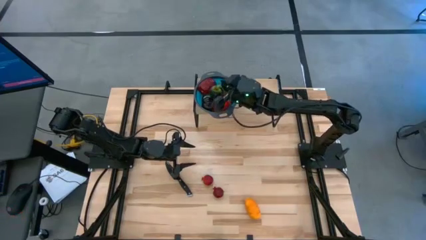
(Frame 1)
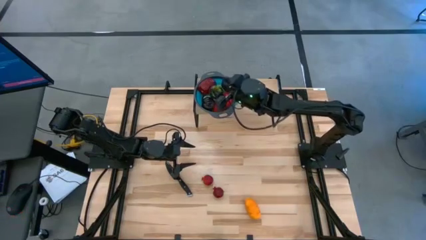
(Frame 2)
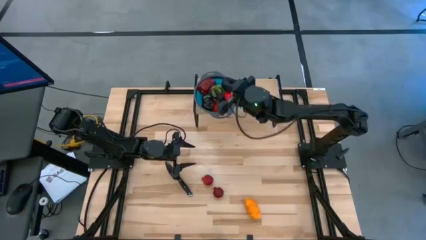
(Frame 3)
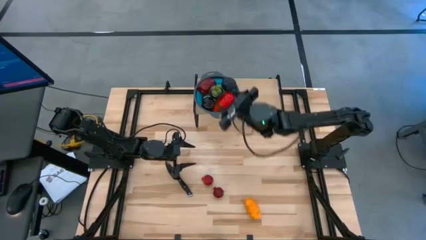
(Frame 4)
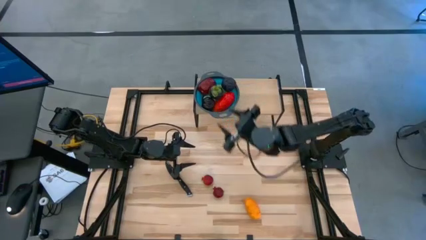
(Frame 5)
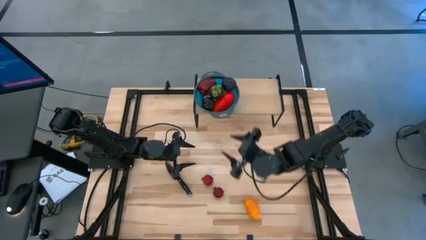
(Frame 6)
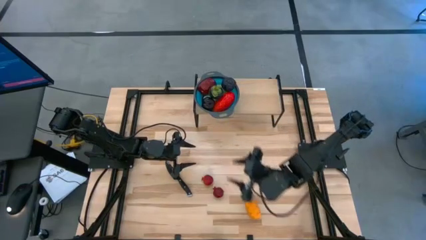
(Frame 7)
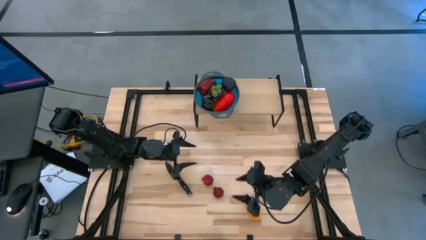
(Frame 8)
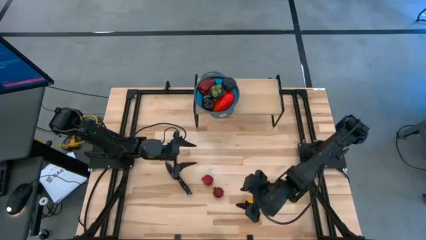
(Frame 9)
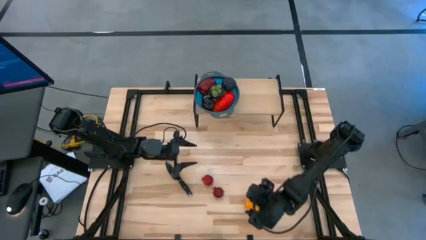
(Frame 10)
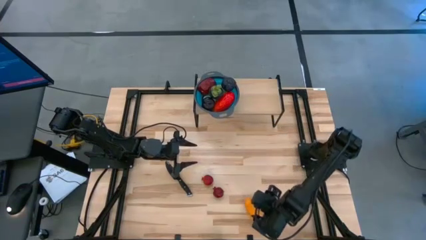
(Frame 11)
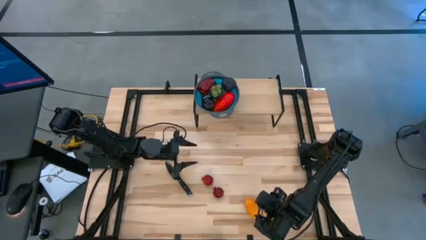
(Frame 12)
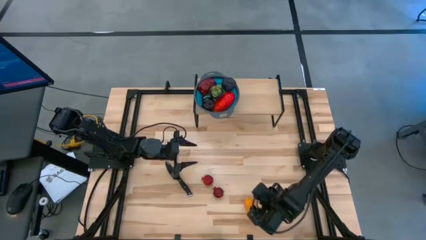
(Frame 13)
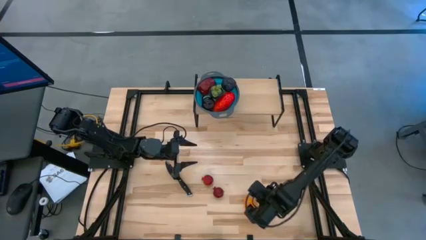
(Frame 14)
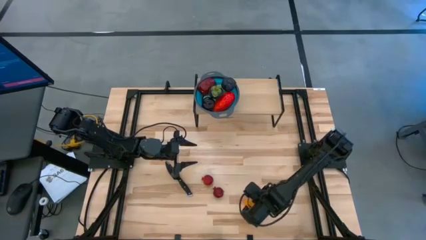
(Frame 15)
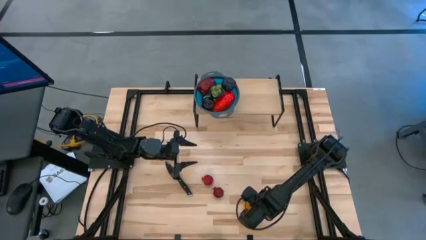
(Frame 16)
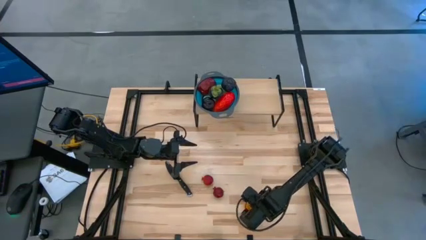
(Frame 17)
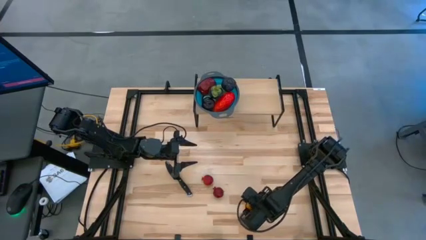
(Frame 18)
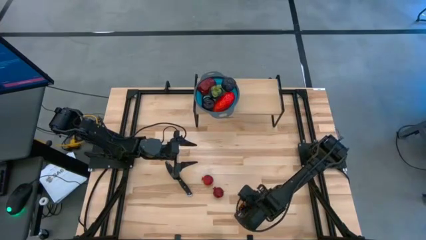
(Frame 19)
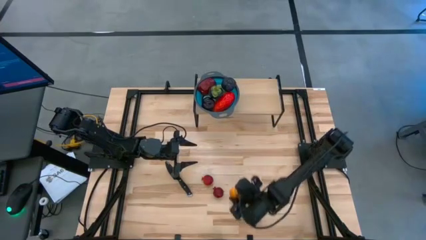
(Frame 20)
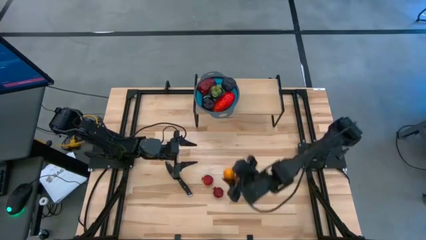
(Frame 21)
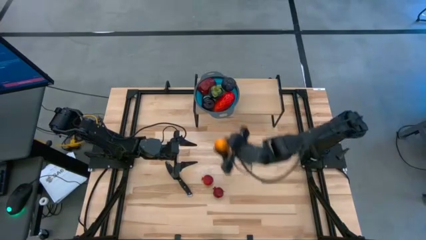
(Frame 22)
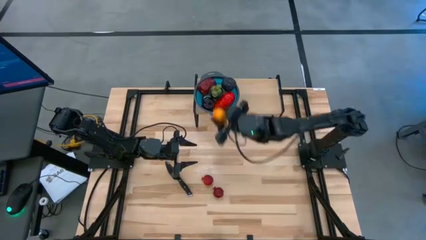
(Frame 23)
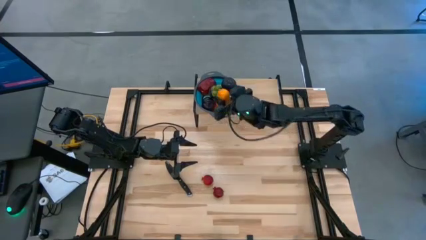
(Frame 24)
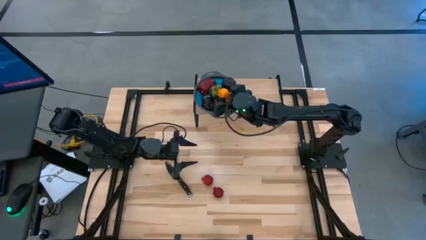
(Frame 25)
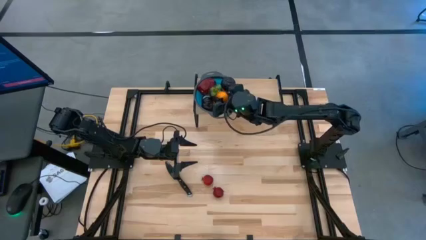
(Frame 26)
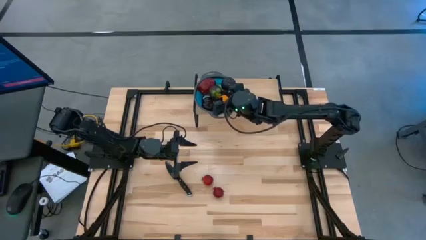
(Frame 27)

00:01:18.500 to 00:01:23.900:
Task: Pick & Place Fruit
Put the yellow mango into the blue strainer bowl on the shelf

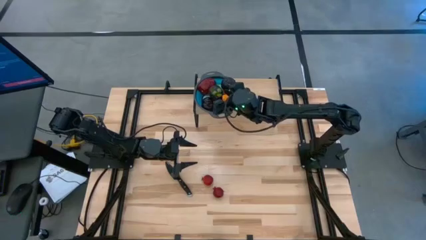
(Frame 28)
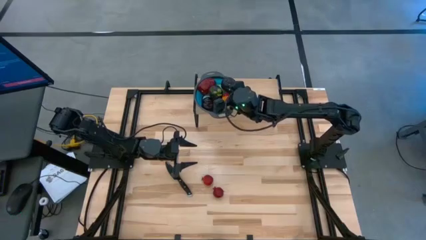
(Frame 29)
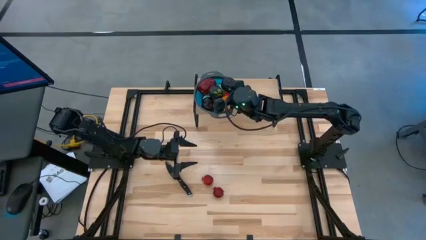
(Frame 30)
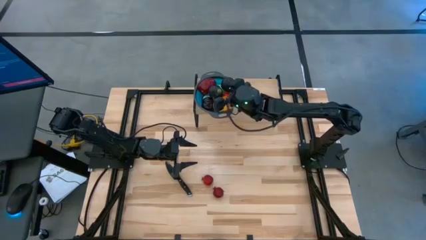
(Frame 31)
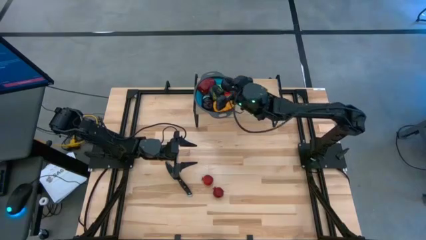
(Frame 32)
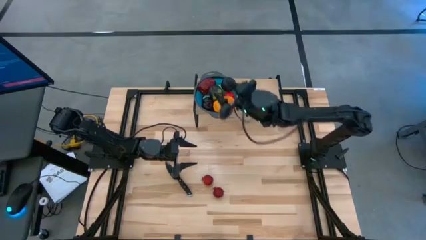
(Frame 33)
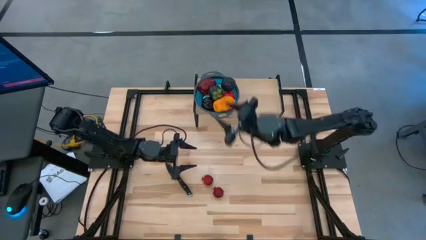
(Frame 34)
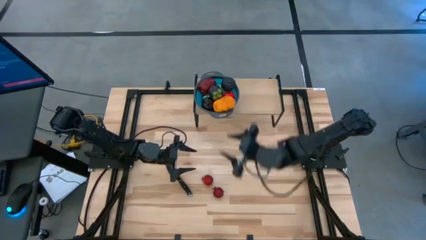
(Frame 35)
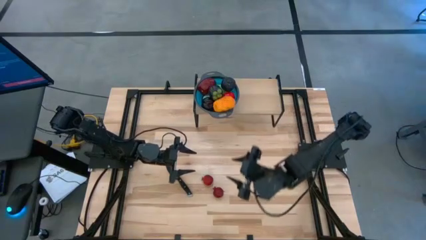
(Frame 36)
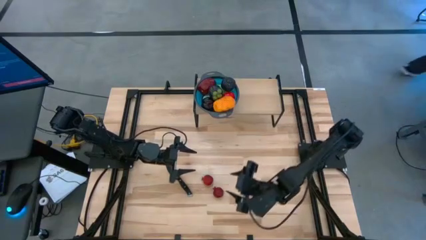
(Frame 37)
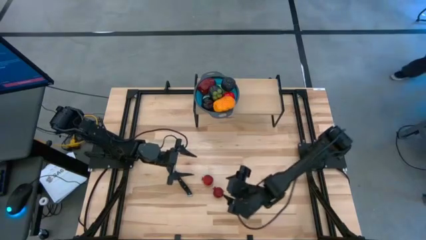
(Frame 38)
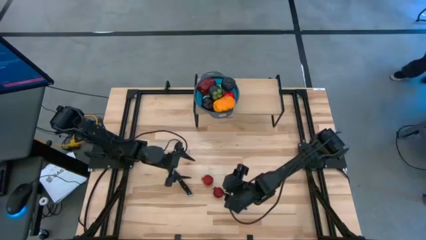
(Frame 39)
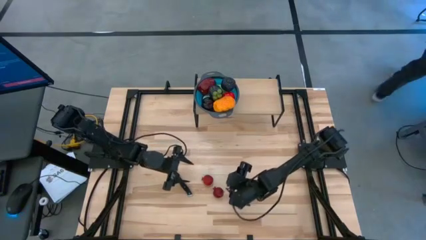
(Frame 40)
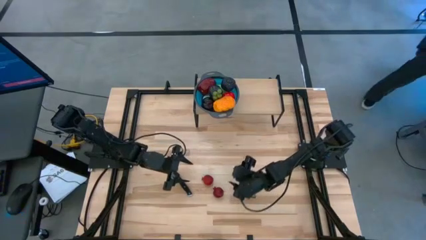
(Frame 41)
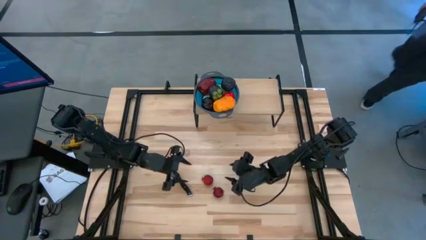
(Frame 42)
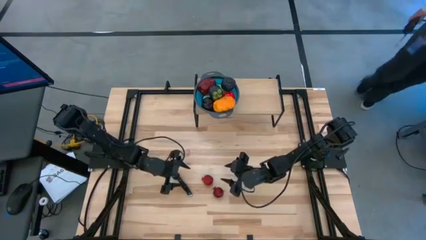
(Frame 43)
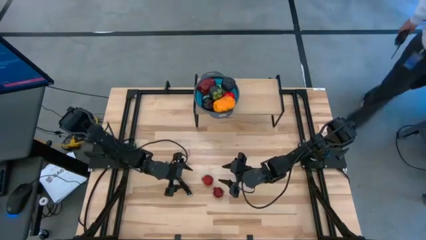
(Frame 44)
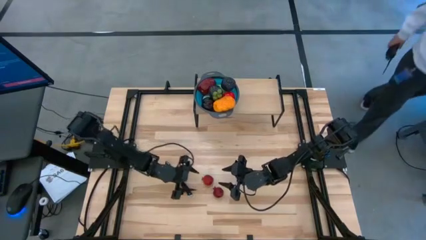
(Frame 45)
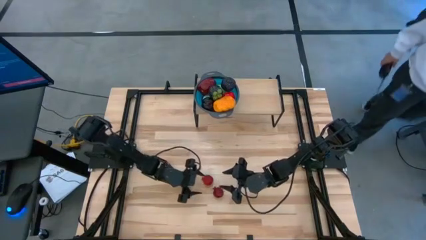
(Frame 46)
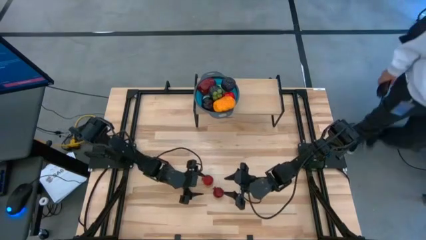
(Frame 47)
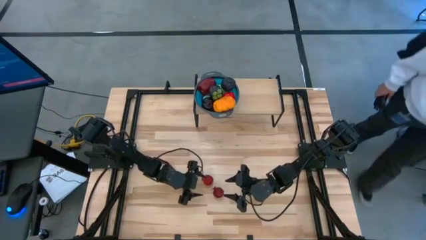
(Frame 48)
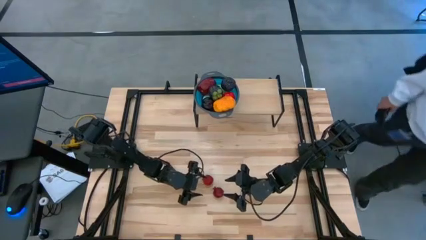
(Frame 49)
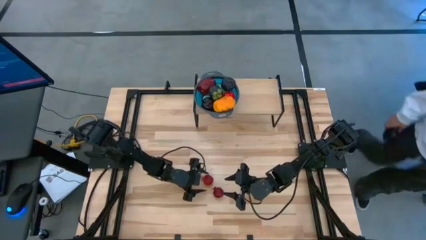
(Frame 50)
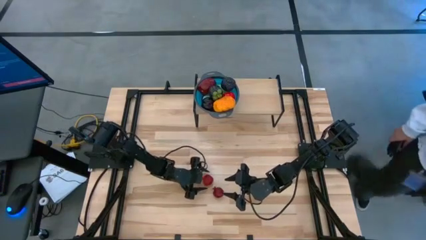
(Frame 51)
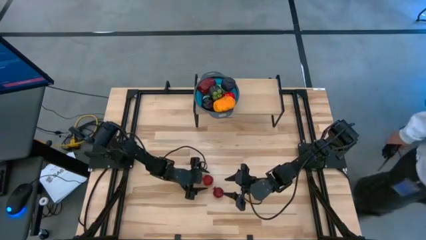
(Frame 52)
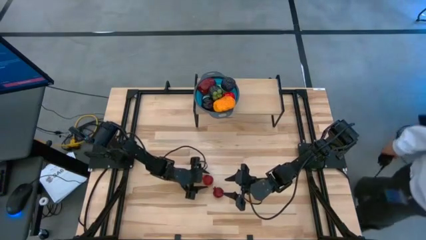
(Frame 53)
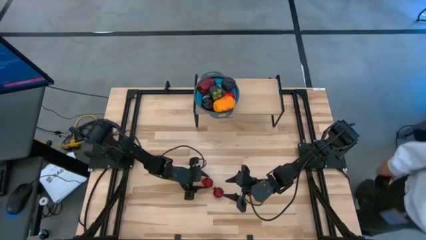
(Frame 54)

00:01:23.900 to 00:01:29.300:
Put the top red pomegranate into the blue strainer bowl on the shelf

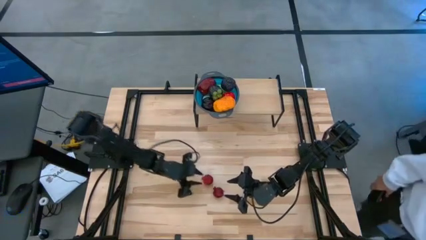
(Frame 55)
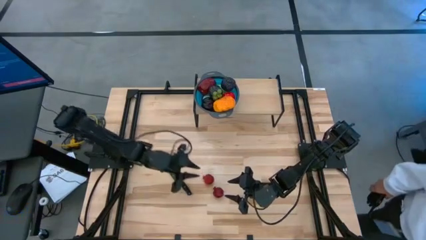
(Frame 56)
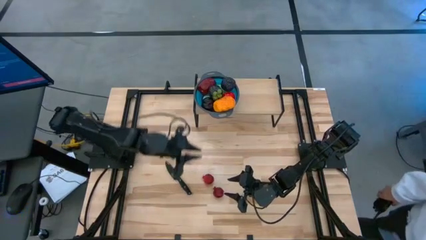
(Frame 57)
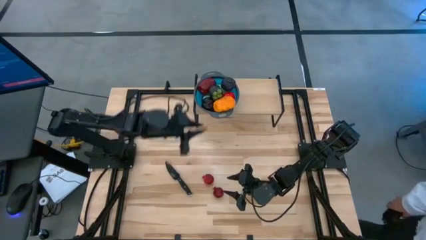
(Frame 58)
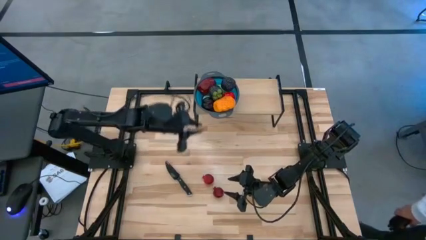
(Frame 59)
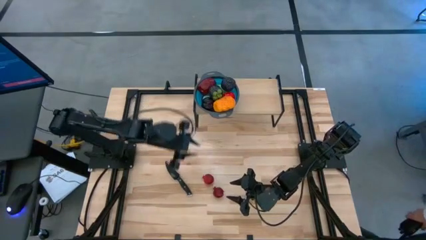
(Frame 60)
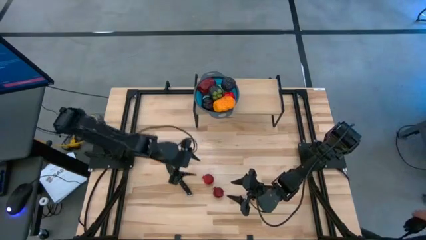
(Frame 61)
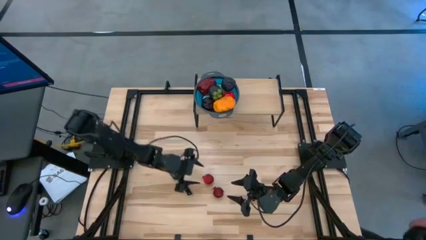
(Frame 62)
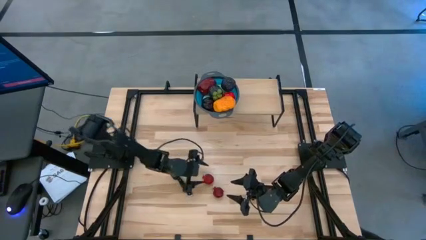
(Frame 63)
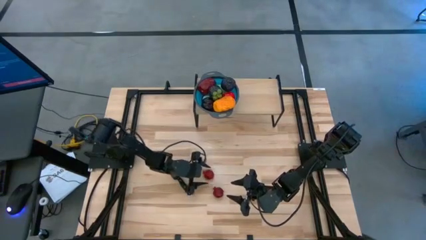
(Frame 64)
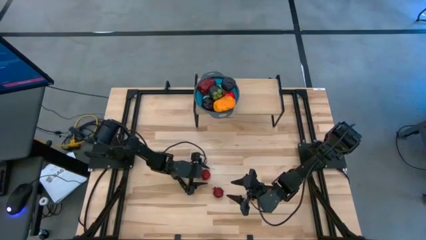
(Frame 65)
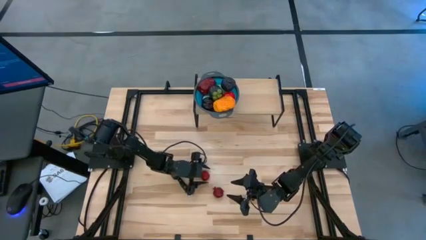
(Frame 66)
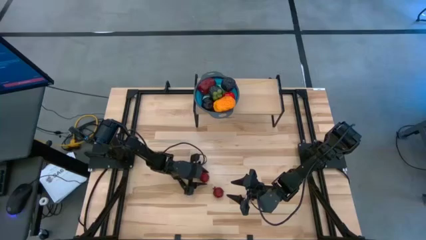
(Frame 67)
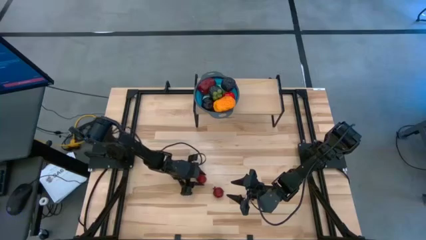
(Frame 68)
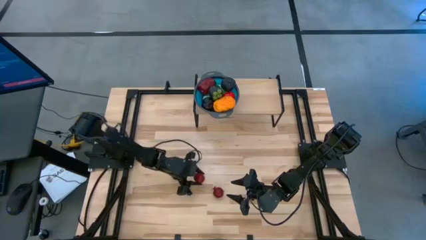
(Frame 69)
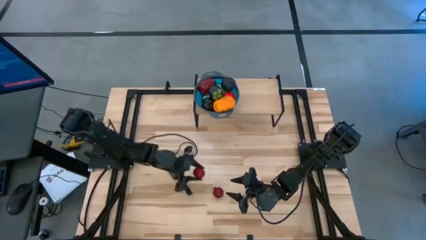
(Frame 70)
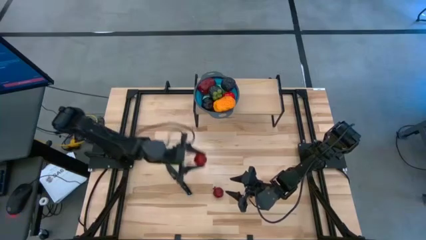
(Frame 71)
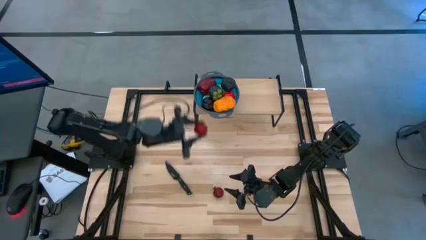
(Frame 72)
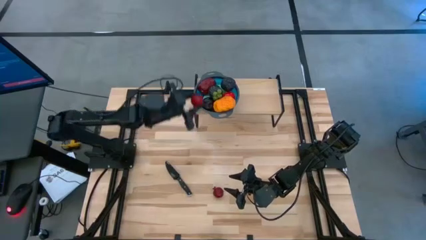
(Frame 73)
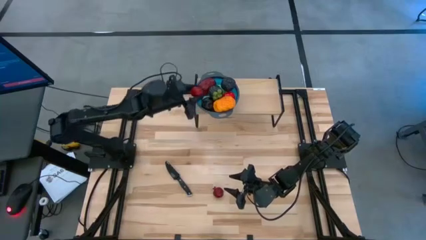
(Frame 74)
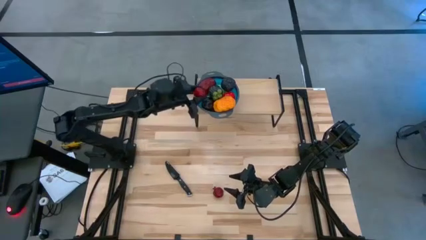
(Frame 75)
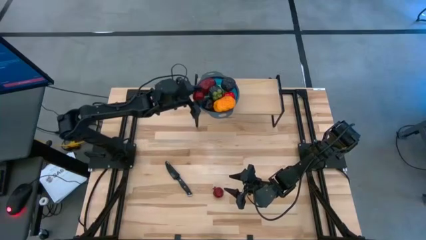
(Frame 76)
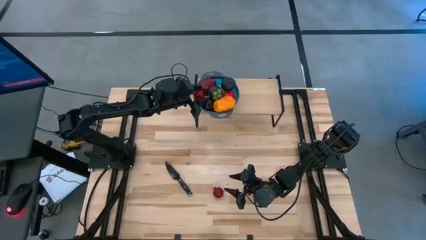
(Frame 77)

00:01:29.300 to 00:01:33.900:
Put the top red pomegranate into the blue strainer bowl on the shelf

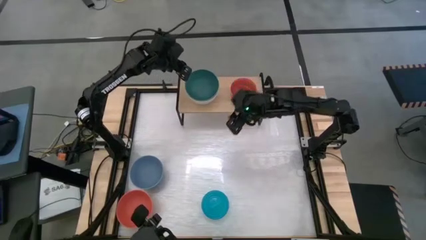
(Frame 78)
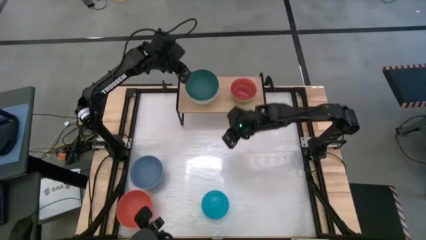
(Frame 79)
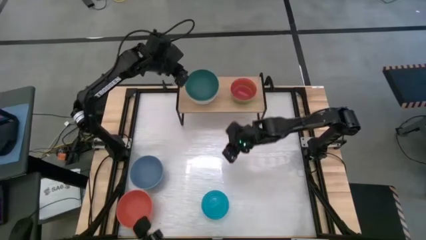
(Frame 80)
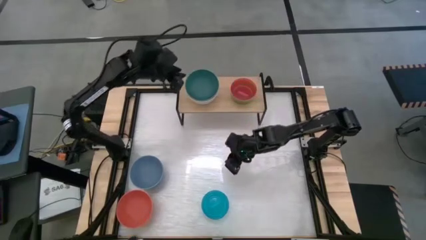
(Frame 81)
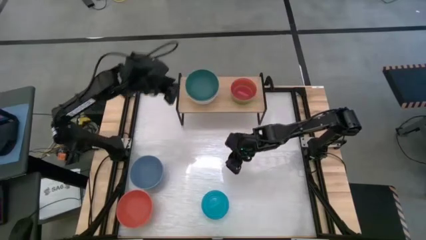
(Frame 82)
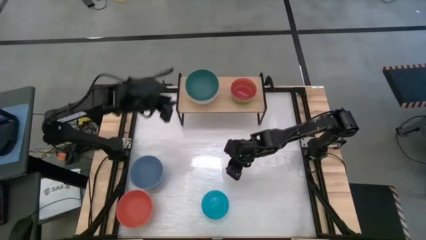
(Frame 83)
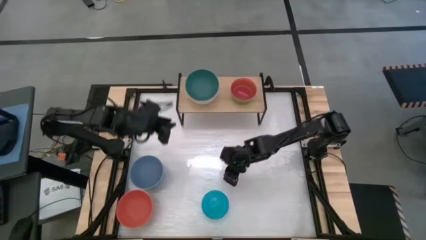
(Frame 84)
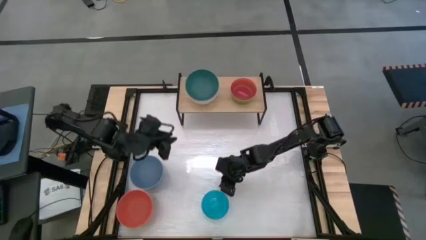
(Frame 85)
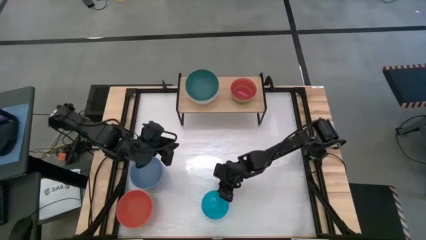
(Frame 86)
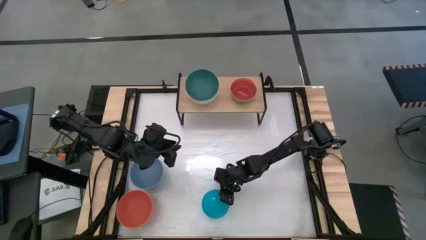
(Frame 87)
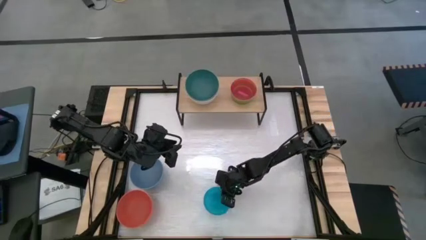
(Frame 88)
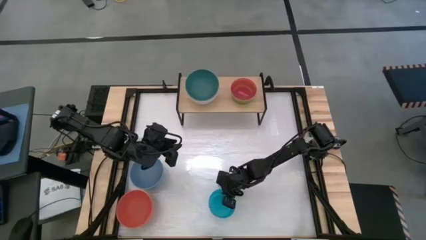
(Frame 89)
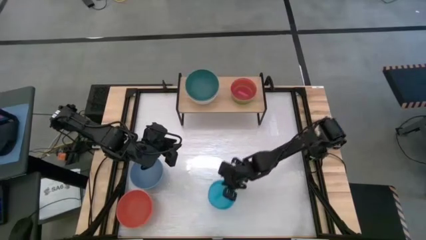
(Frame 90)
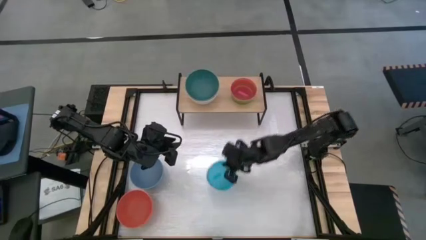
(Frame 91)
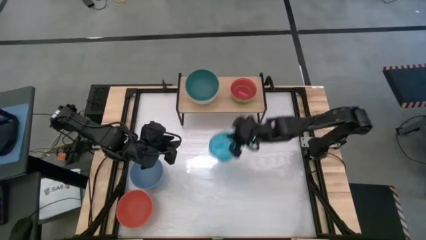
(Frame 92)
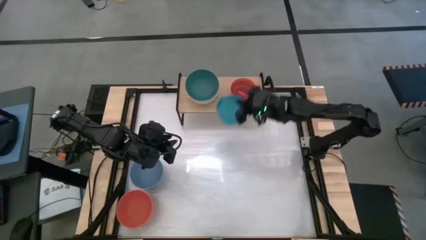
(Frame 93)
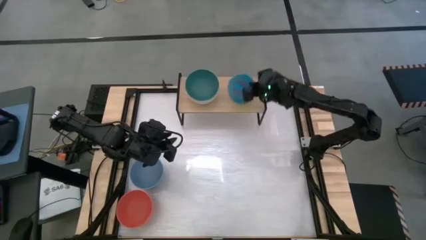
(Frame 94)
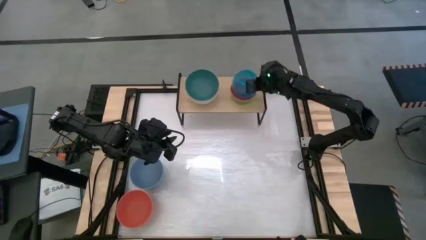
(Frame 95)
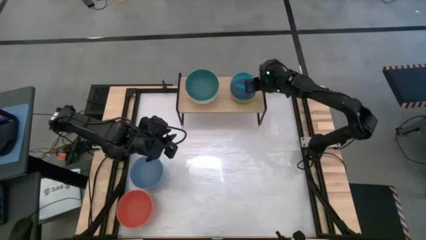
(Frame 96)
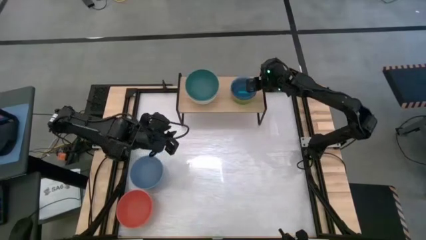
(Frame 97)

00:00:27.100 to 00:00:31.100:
Task: Place and stack bowls onto a shelf
Stack the small blue bowl on top of the small red bowl on the shelf
